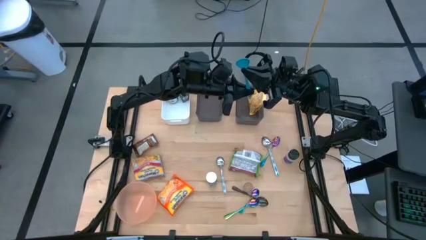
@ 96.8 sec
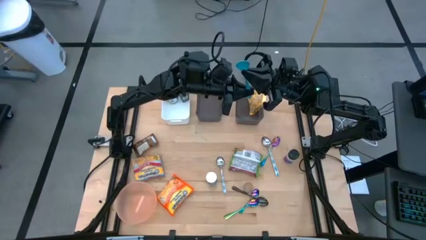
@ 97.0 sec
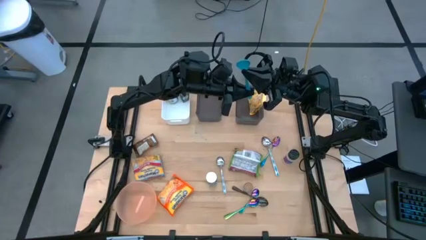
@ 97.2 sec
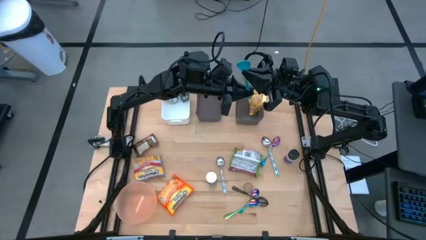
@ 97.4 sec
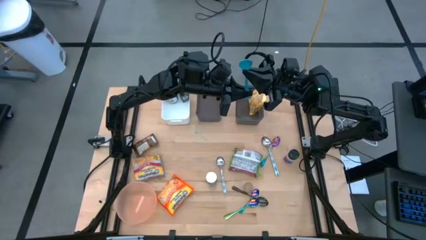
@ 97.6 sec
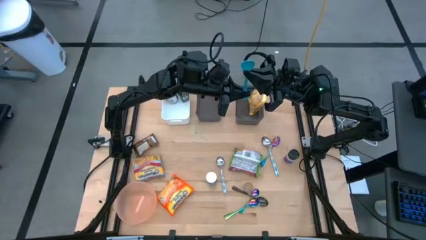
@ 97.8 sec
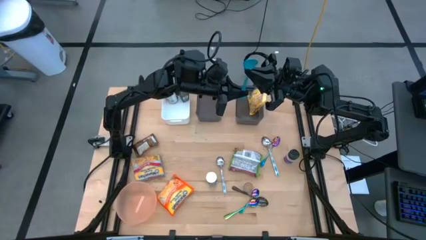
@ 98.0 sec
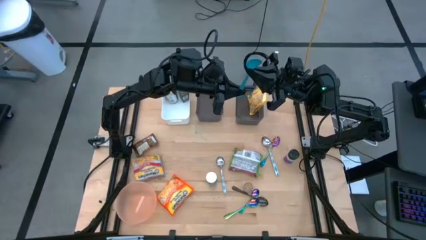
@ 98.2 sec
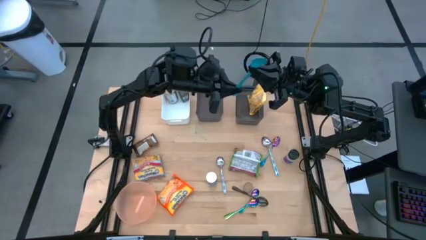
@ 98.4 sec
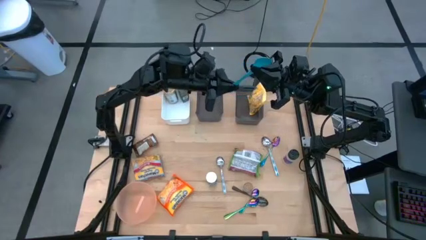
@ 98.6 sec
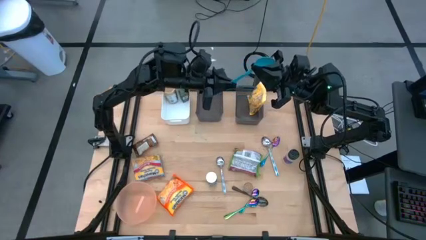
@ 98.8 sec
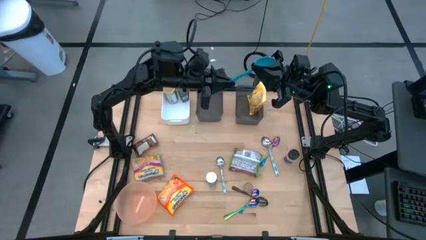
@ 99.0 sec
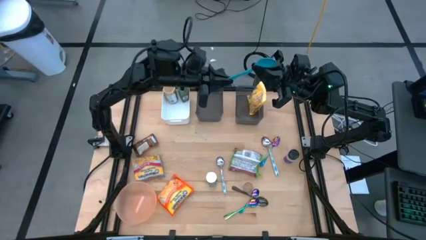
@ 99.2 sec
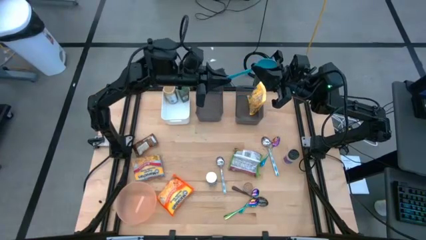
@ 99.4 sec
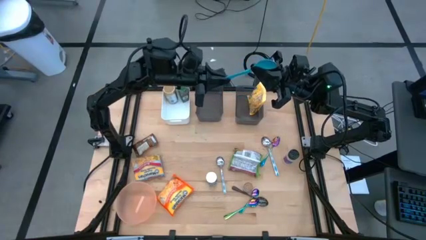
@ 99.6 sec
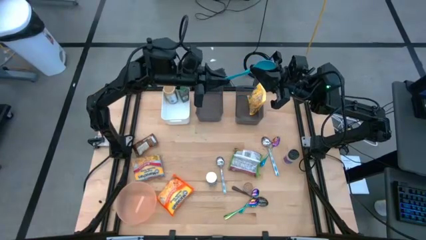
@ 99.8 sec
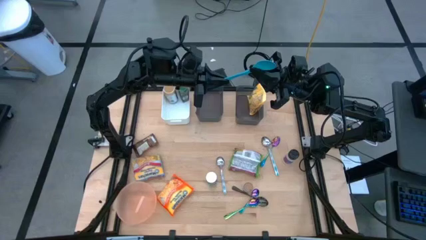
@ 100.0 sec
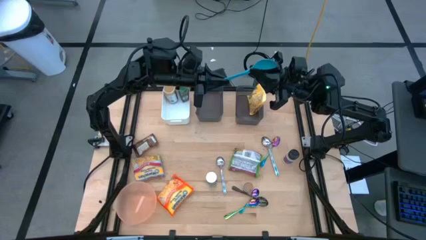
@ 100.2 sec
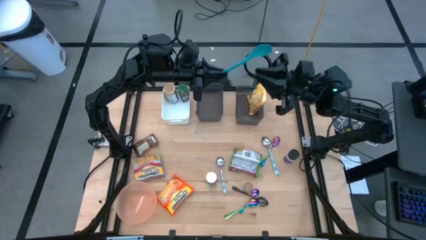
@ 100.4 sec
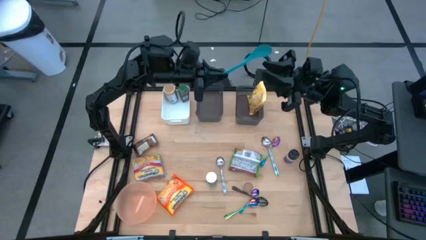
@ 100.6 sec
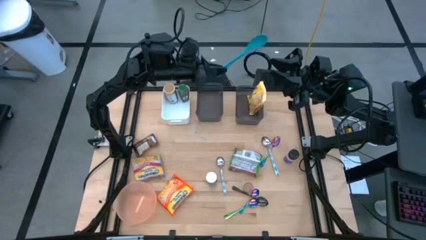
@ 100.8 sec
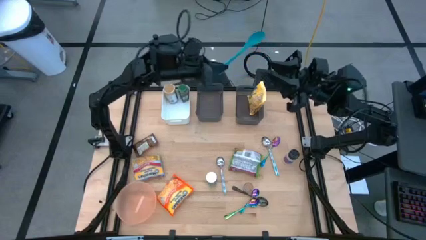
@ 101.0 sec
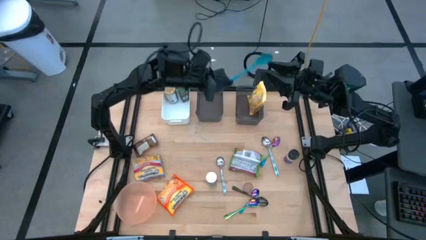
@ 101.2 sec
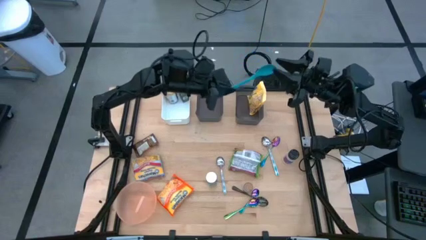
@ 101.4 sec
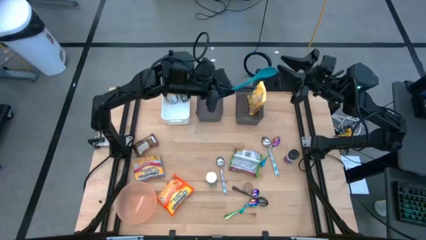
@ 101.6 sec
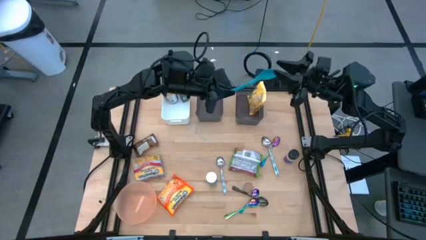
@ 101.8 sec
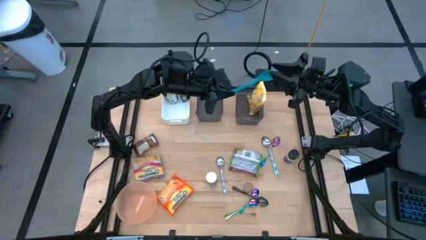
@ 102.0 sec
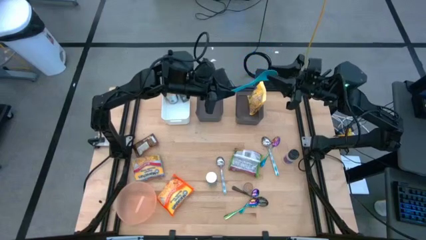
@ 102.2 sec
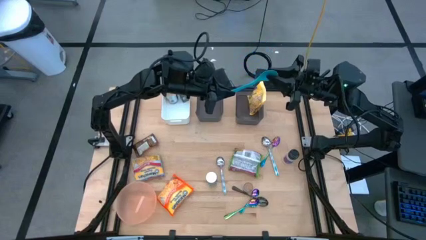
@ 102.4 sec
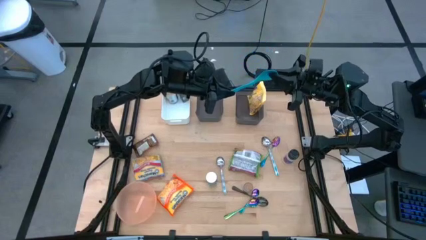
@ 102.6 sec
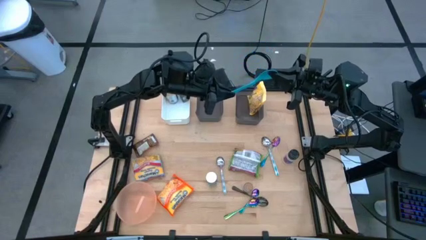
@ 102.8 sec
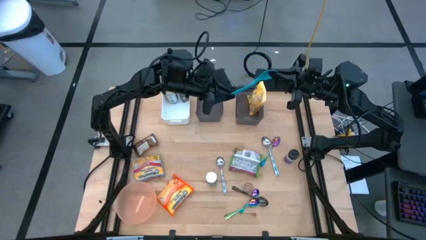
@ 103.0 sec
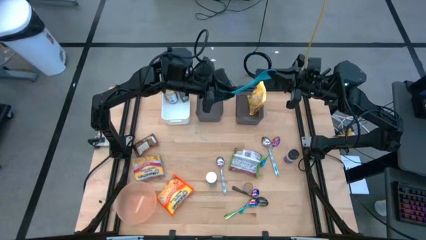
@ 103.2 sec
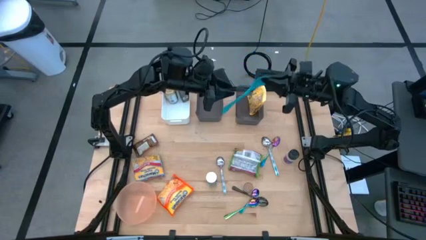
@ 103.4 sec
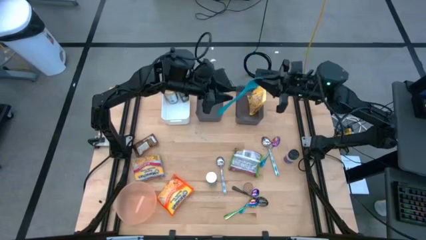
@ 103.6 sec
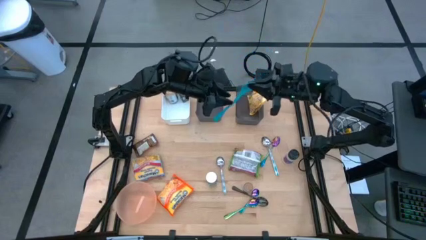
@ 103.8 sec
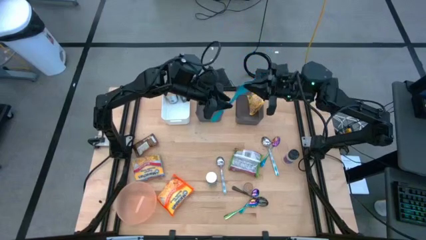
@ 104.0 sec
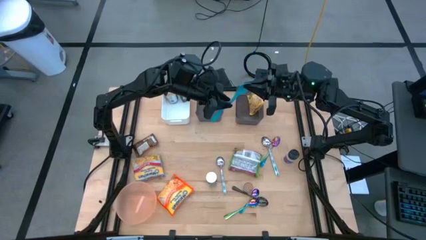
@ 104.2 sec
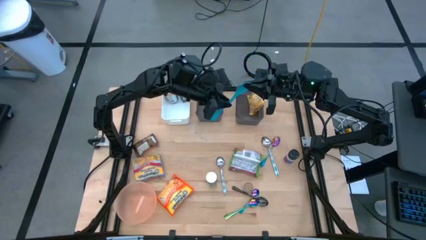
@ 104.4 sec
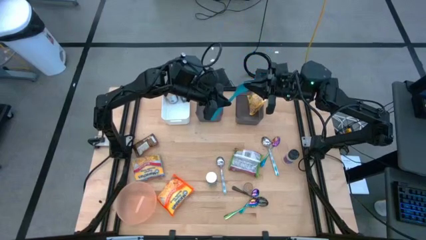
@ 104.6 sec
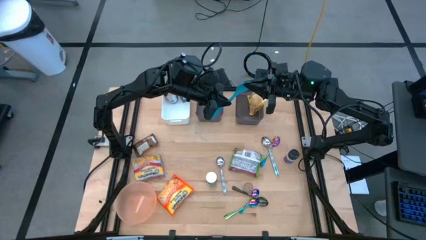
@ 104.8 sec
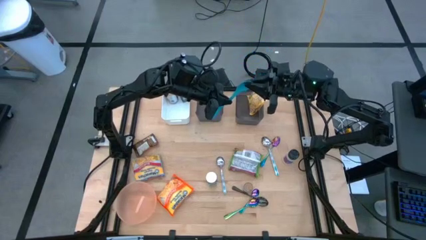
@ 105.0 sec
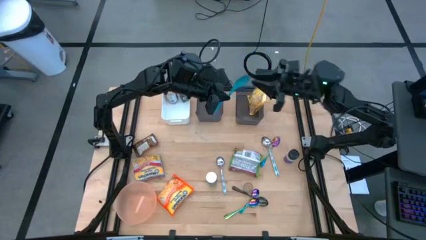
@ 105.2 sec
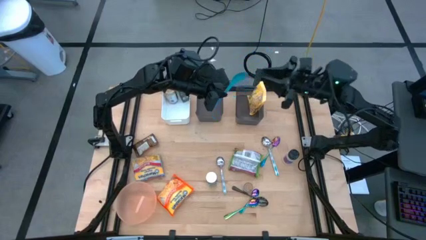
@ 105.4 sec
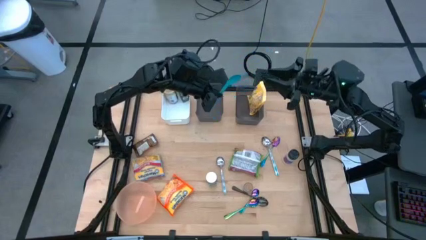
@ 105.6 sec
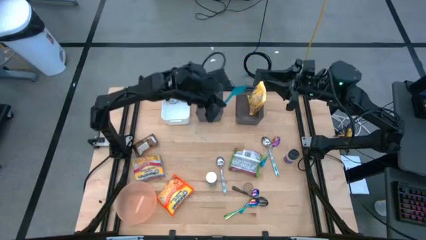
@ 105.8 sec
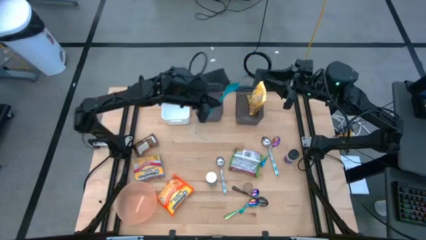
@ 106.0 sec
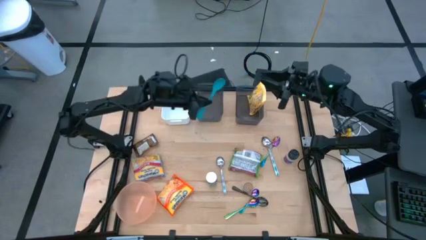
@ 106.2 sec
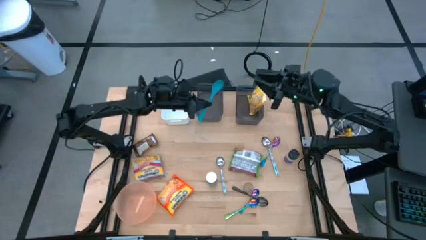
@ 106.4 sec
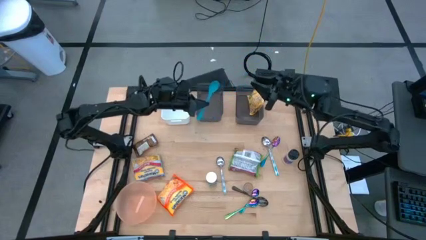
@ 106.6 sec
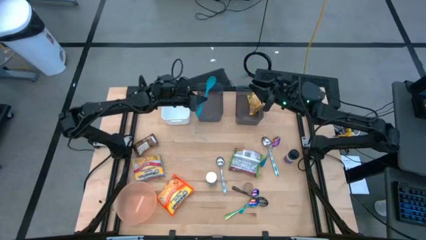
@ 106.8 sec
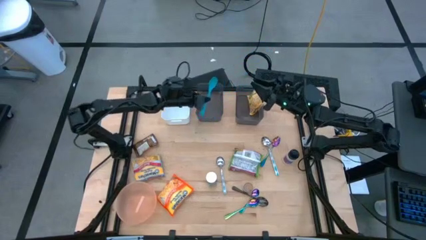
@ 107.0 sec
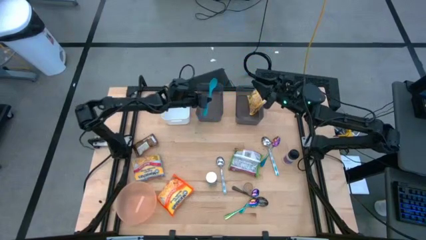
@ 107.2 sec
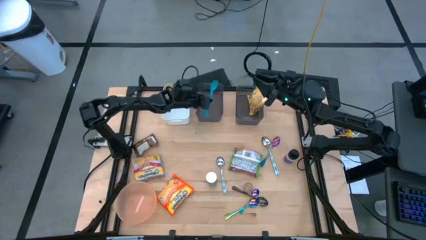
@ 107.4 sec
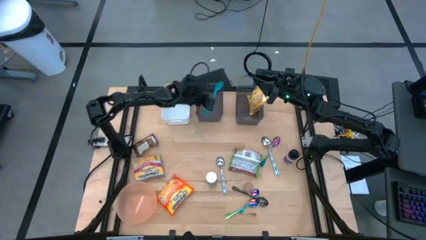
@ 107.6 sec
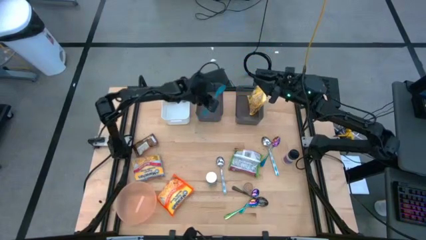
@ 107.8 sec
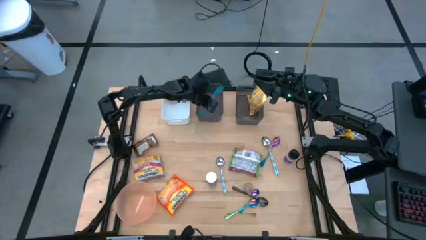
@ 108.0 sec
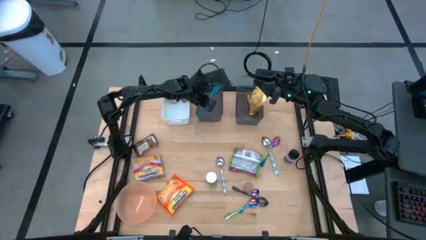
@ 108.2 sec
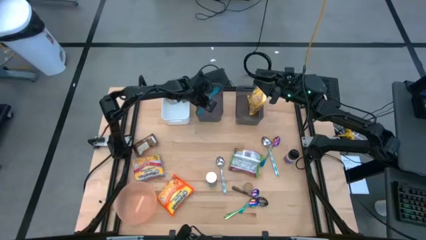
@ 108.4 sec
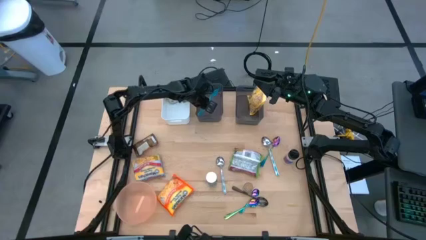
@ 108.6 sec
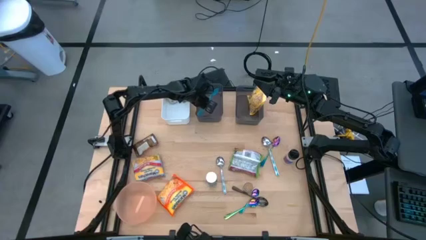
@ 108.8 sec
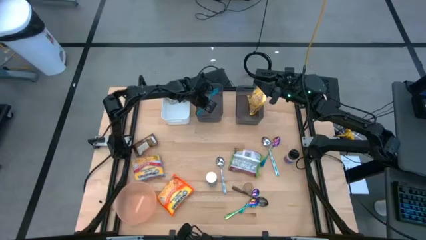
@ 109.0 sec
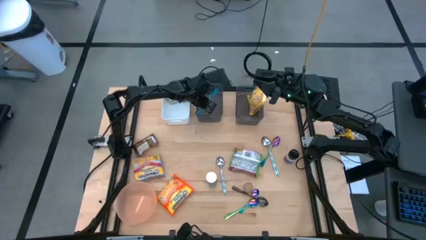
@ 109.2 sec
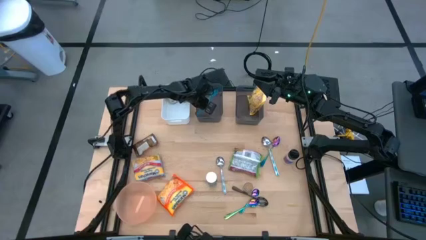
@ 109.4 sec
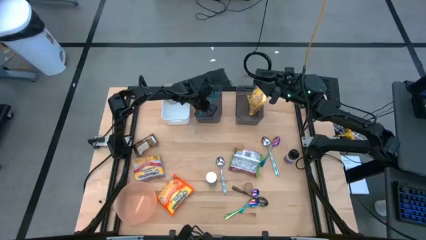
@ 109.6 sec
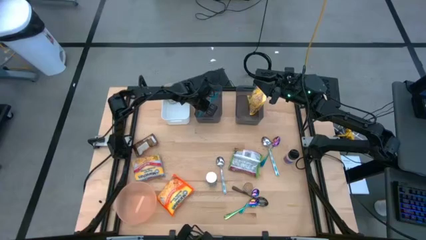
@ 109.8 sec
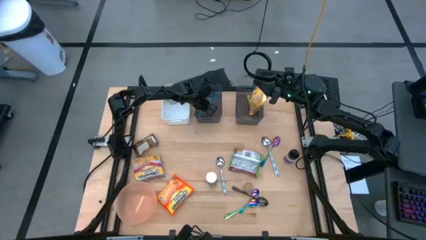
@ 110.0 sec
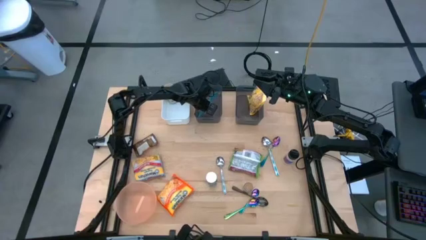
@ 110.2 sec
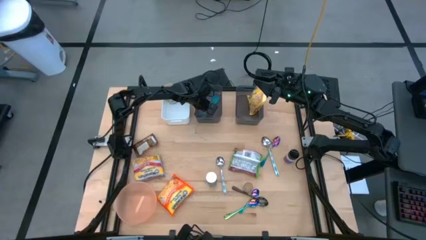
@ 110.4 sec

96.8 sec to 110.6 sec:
Task: Pick & Place Food Item
Put the blue baby spoon into the left black bin
